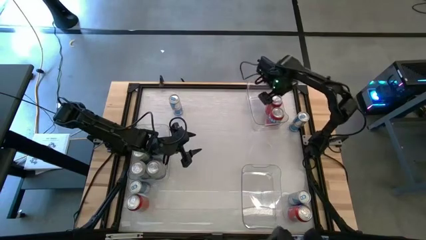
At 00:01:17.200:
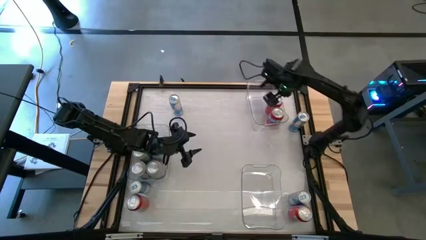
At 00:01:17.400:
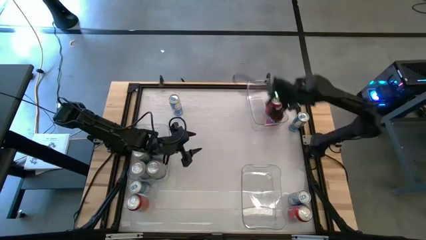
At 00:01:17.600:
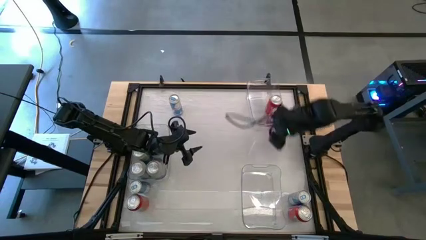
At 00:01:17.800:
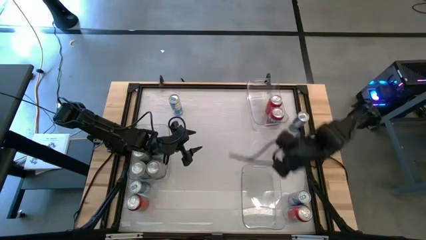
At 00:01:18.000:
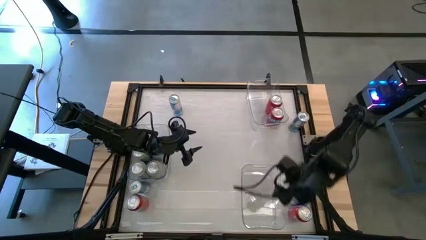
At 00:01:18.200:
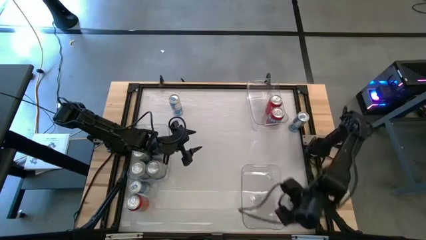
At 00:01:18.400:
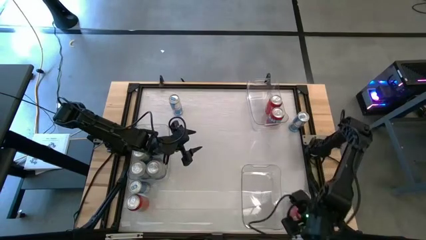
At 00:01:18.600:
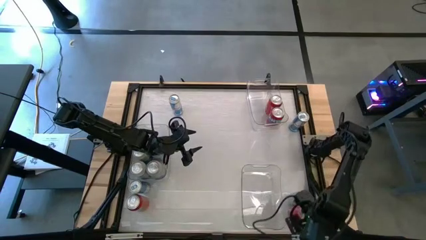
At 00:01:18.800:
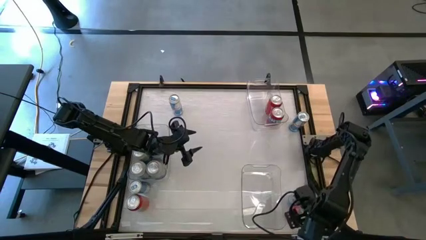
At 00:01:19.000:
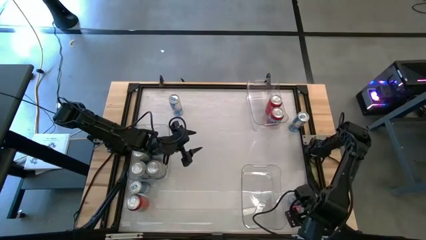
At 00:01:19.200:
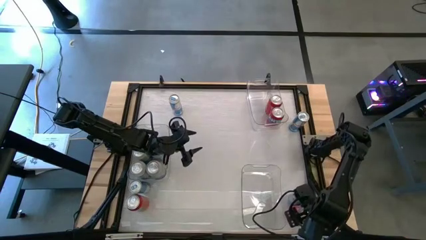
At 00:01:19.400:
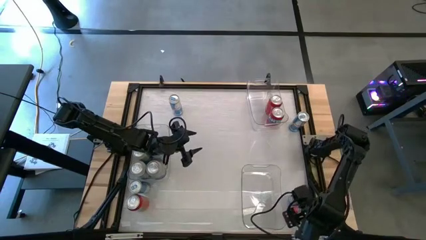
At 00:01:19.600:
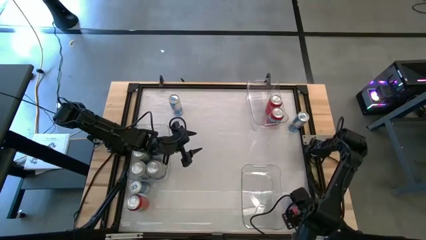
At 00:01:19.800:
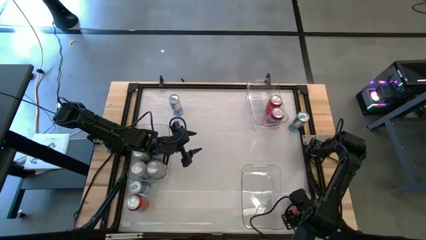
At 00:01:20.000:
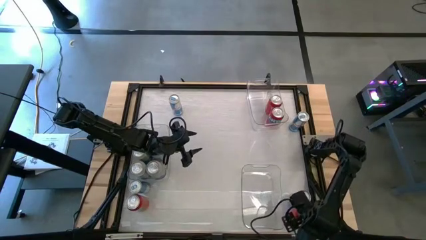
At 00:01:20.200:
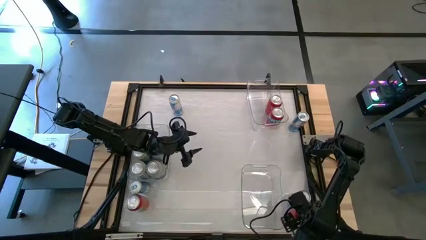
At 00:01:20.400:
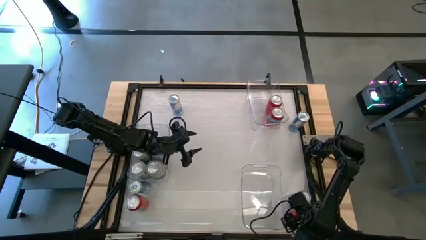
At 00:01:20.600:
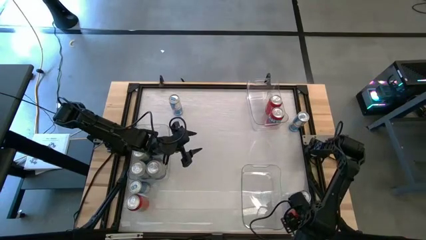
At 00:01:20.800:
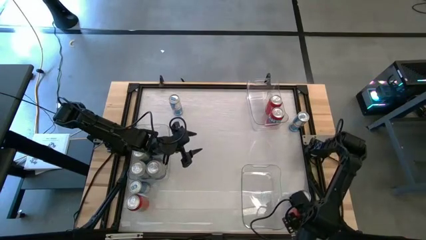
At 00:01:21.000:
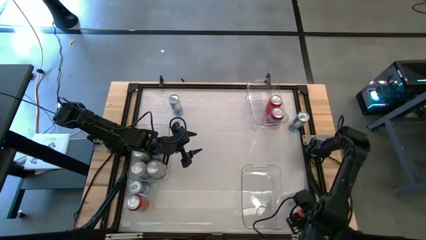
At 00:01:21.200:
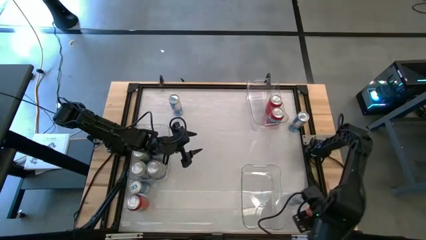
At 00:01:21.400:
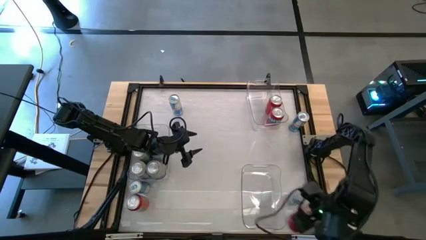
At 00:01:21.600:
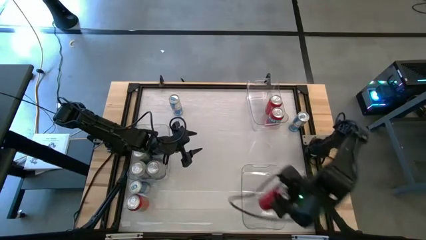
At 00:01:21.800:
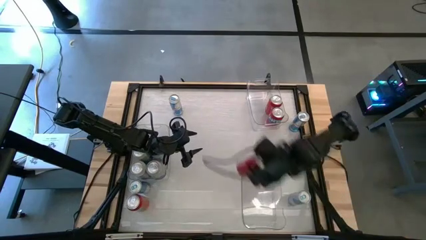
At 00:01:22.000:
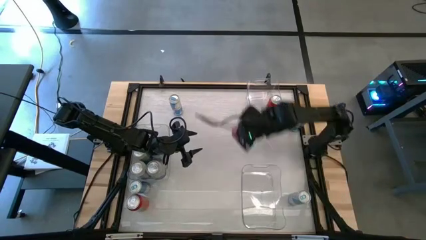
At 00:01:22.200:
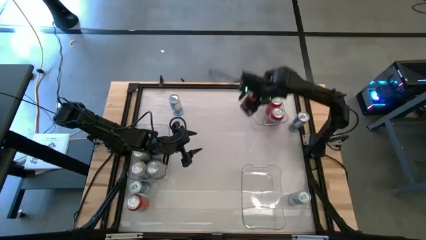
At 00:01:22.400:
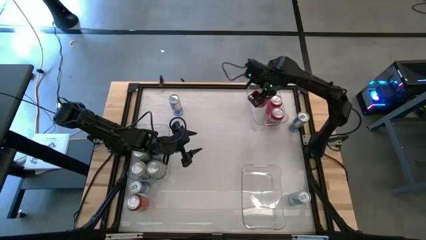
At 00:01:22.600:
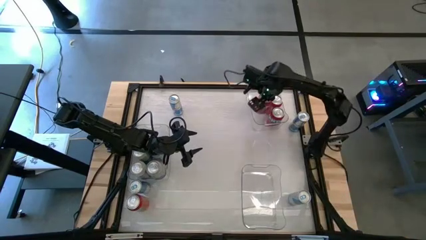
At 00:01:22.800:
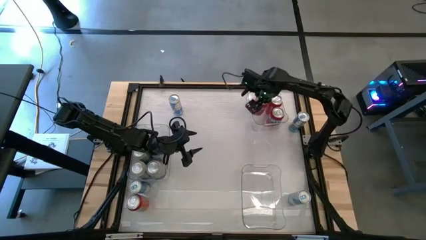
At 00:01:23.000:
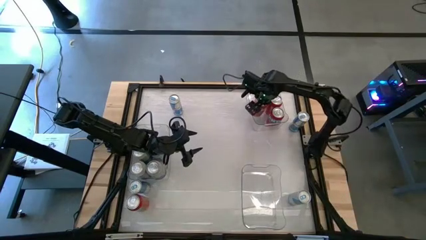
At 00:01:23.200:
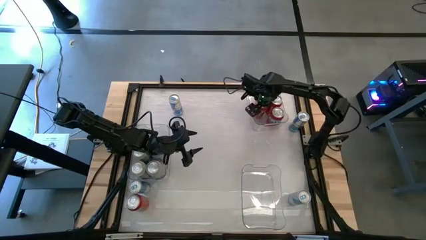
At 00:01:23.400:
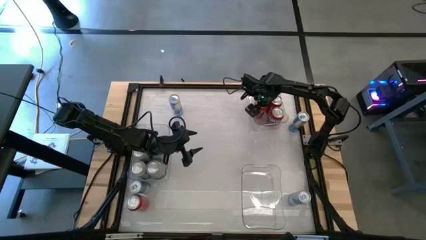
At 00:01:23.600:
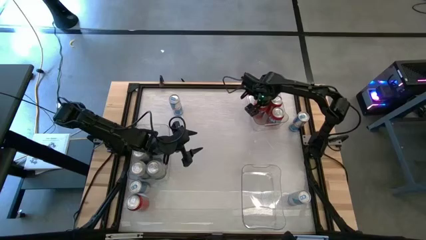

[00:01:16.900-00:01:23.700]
Task: Sort soda cans
Put the right red soda can into the top right transparent bin

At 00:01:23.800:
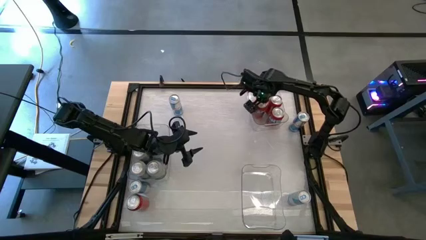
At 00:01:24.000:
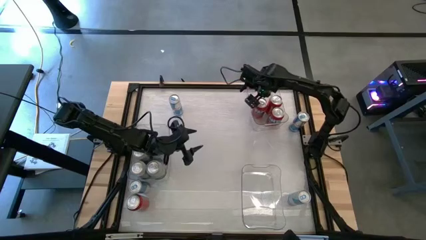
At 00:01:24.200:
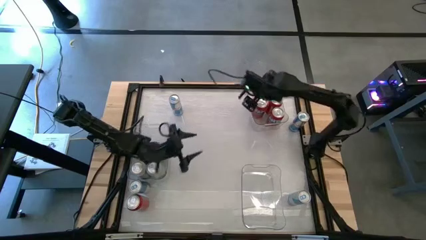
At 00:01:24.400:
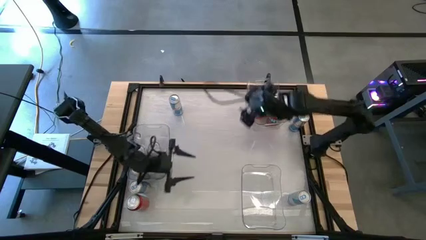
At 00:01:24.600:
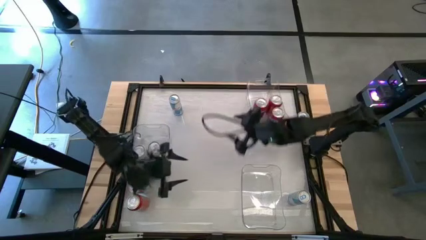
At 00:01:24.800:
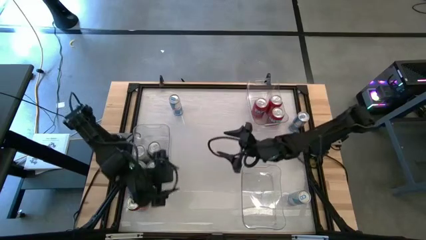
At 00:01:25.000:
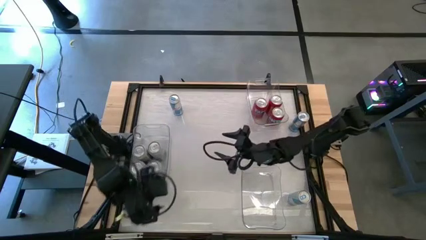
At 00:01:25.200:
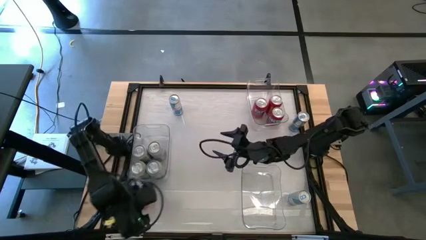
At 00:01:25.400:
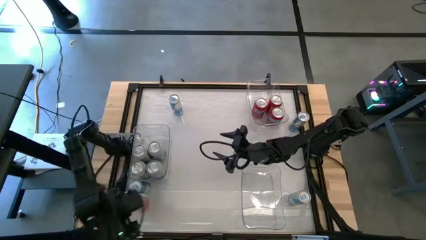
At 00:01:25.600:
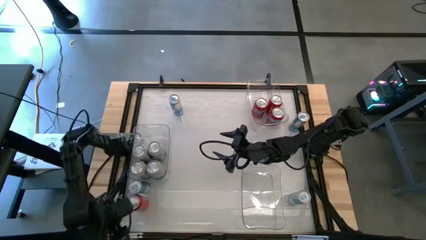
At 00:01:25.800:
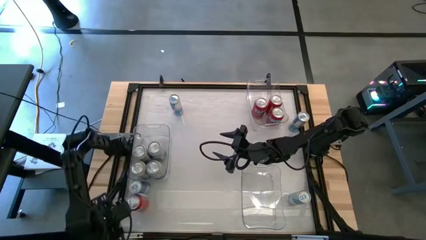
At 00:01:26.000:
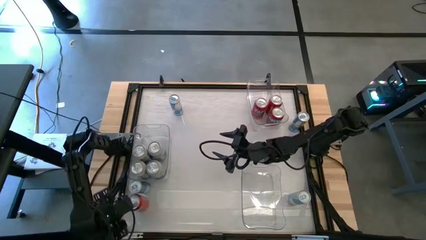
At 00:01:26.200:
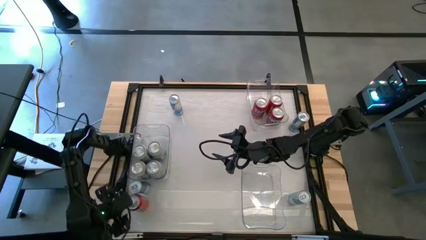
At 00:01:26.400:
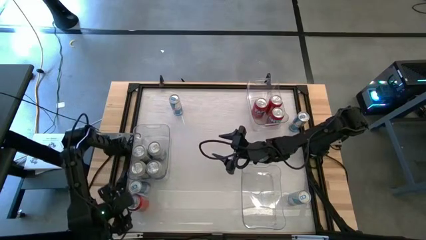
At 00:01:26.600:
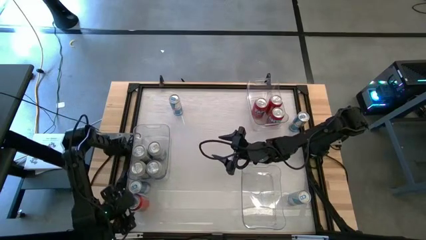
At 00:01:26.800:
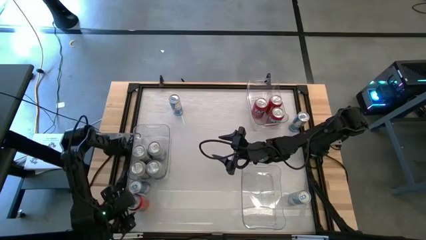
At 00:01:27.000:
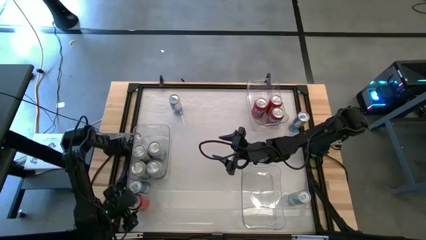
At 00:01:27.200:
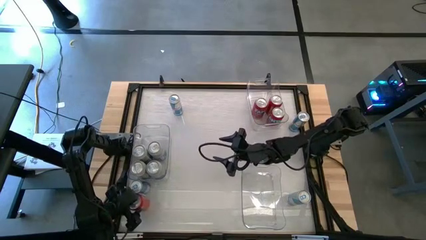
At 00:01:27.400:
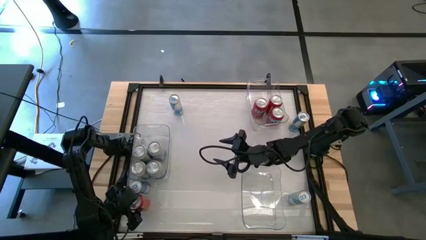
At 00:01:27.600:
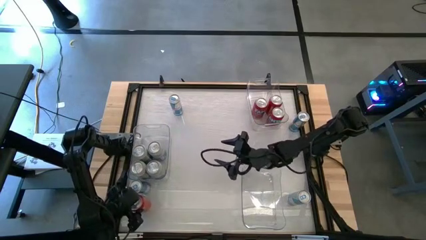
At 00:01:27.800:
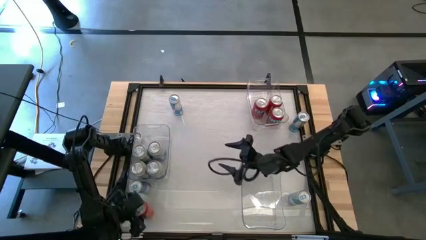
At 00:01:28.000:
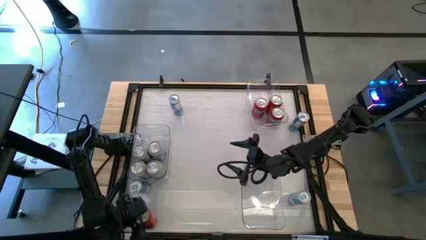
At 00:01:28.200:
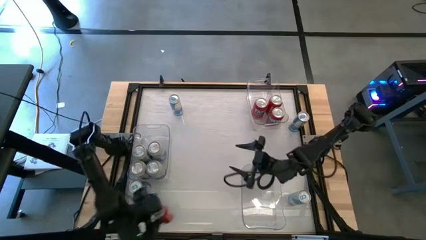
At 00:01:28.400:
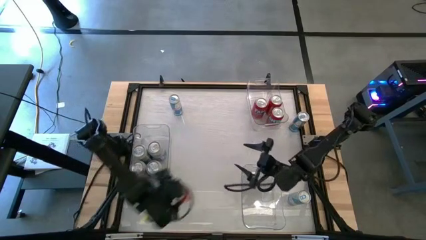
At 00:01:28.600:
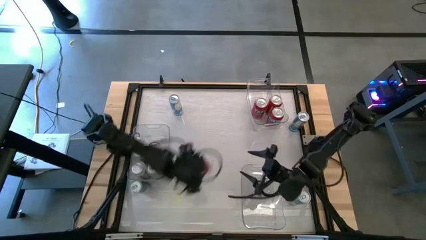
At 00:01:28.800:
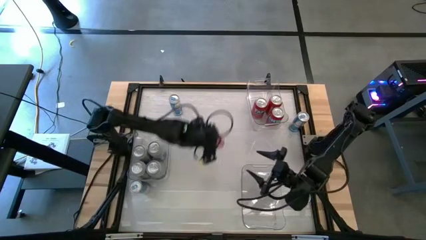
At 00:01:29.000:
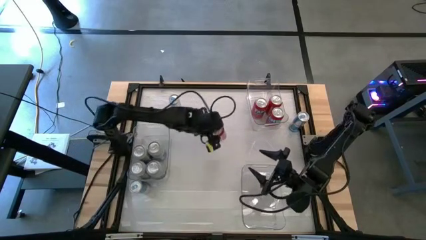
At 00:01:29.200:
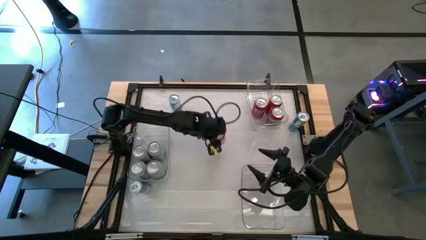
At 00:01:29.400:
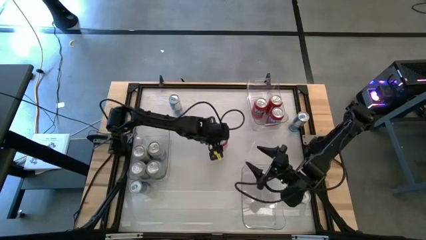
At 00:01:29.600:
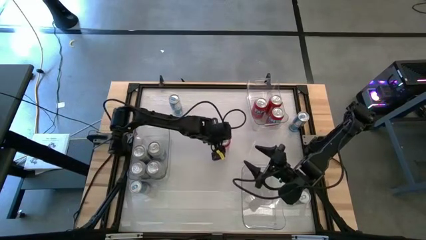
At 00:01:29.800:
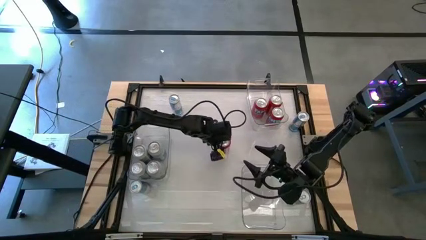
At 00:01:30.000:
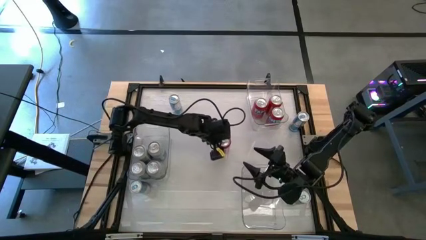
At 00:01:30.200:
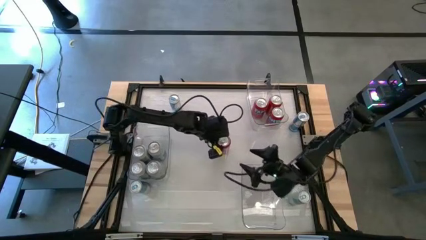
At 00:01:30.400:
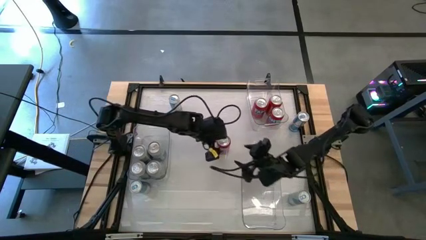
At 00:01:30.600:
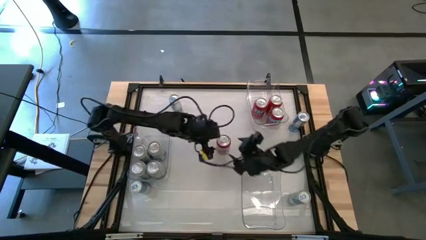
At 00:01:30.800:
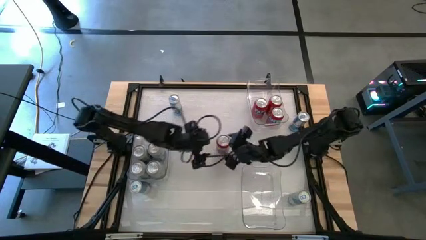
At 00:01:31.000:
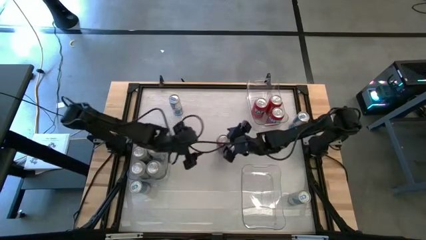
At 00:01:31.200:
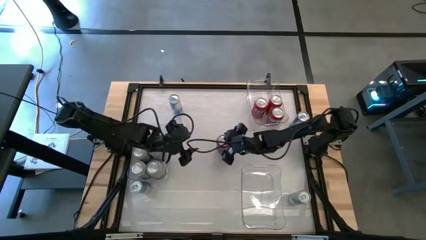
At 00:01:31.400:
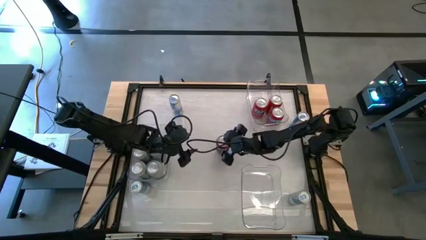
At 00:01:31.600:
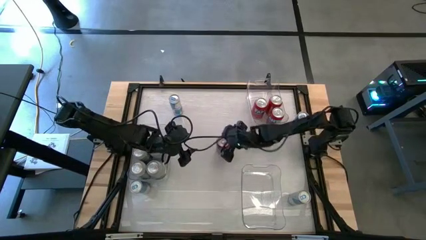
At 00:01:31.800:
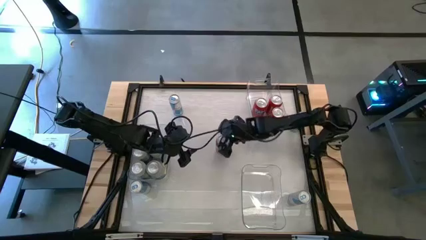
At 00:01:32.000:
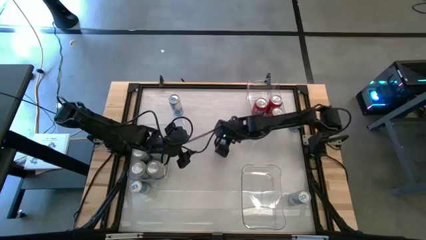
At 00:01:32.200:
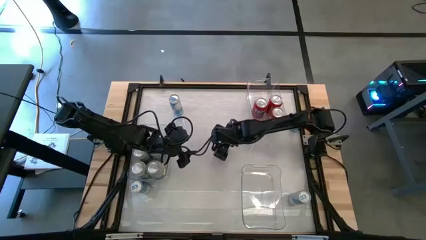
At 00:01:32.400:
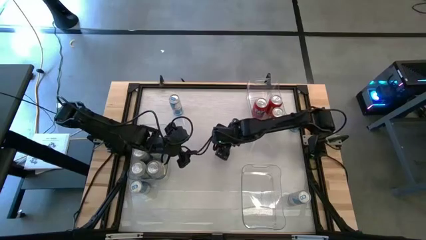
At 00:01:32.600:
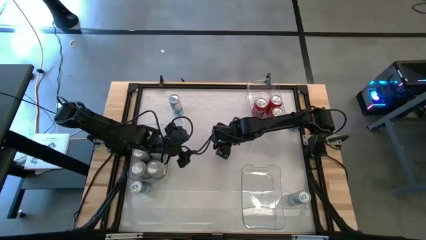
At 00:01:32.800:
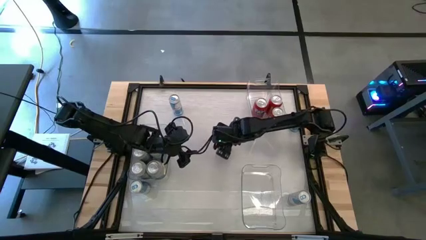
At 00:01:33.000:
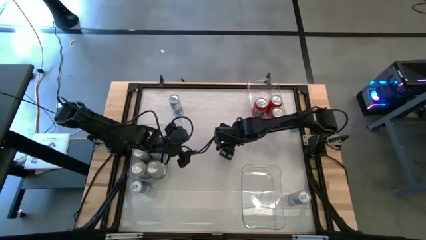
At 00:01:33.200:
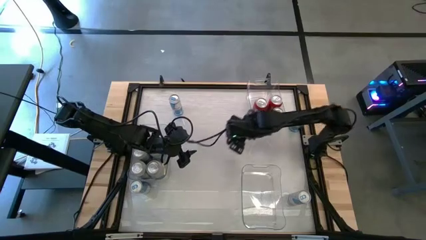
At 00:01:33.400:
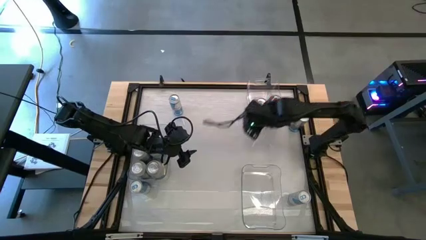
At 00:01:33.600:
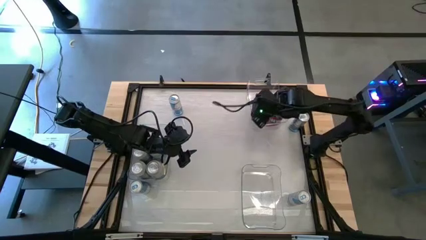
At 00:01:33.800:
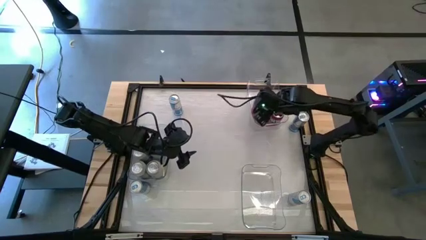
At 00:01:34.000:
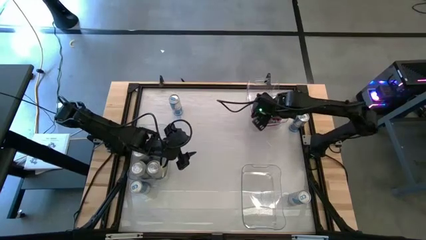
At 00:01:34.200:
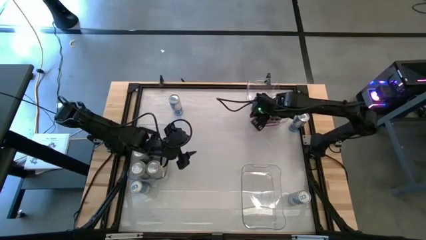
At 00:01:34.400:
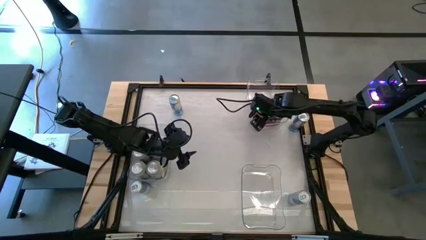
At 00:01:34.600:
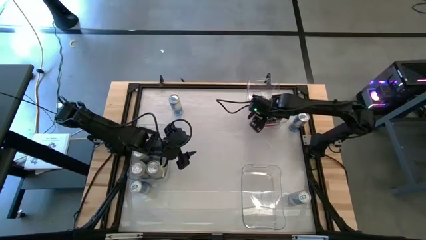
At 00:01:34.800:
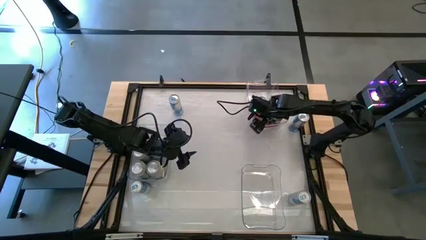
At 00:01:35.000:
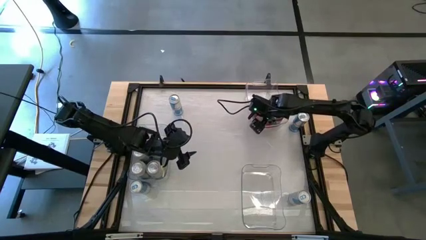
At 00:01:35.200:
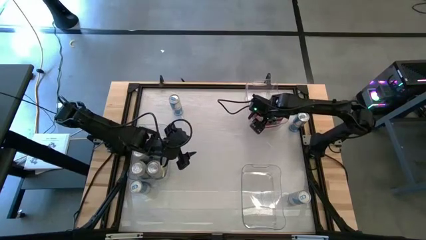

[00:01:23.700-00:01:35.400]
Put the red soda can into the top right transparent bin
